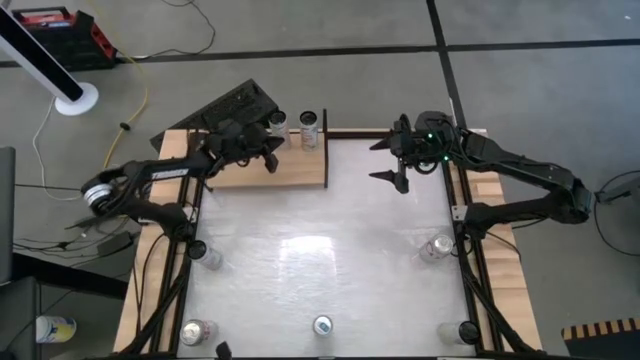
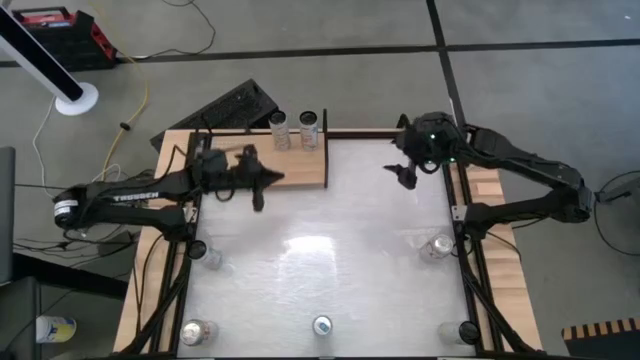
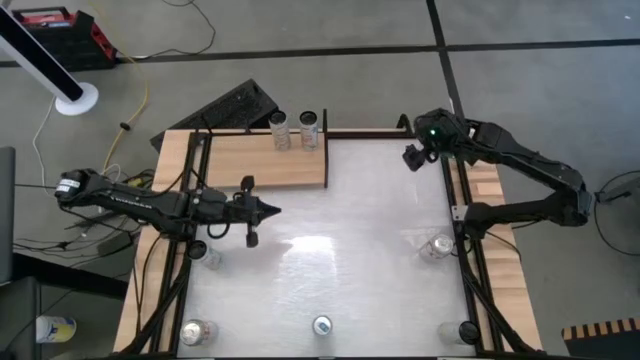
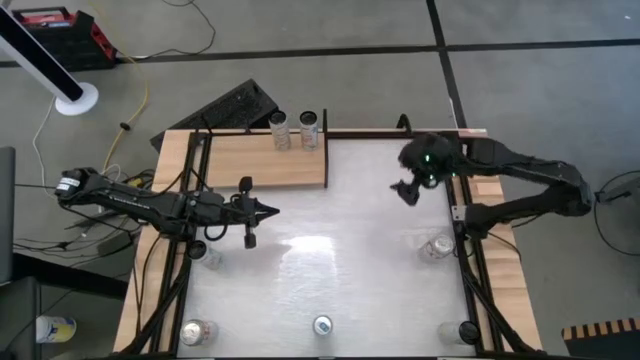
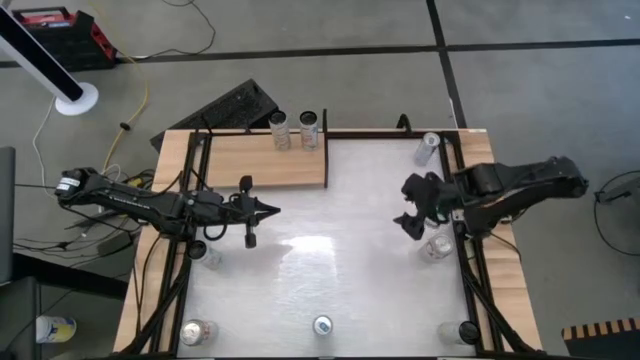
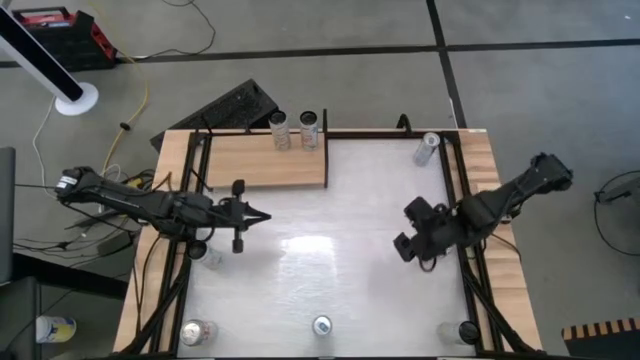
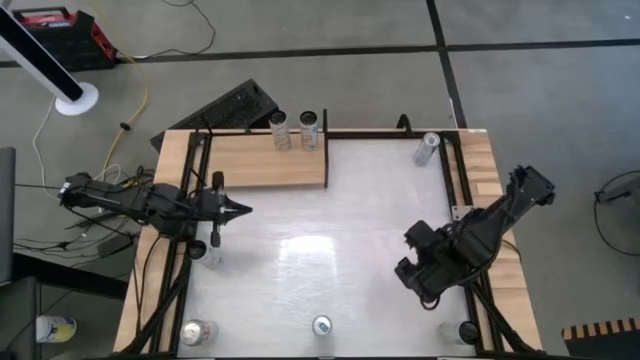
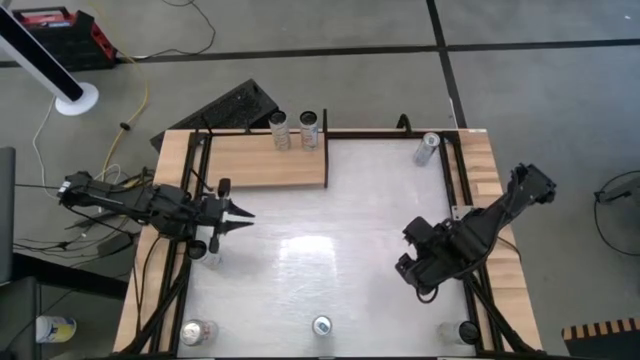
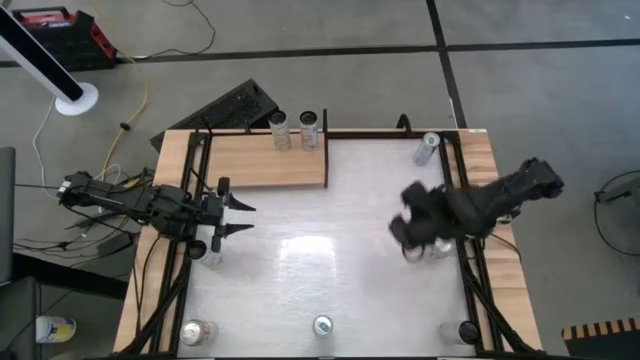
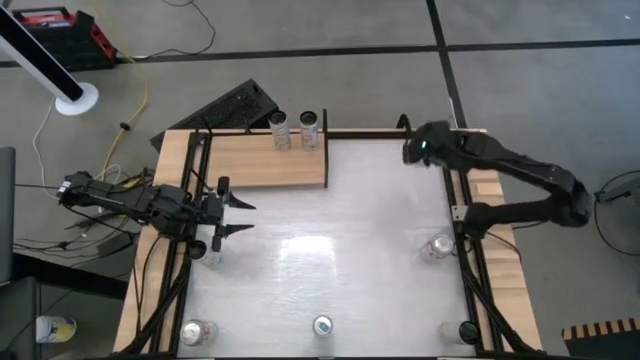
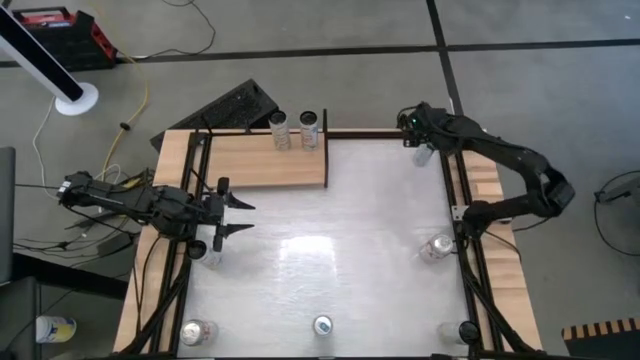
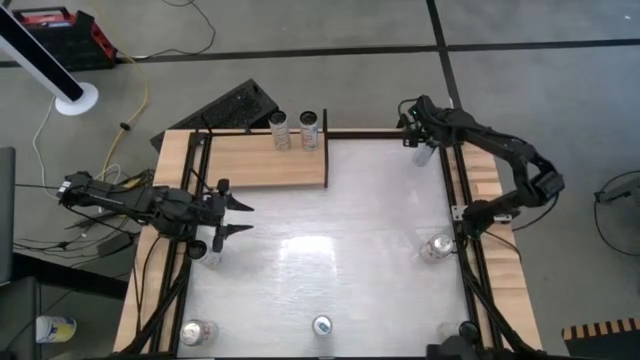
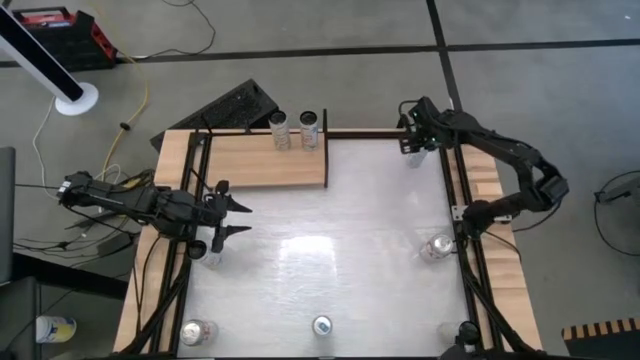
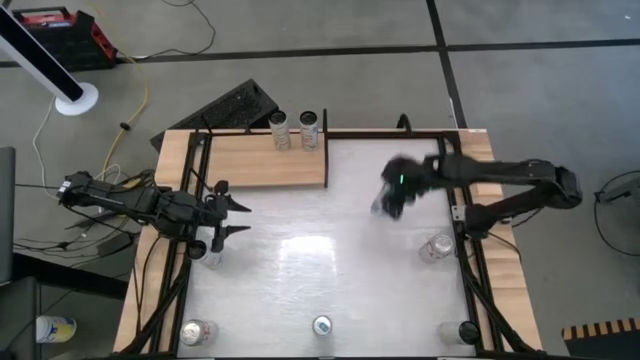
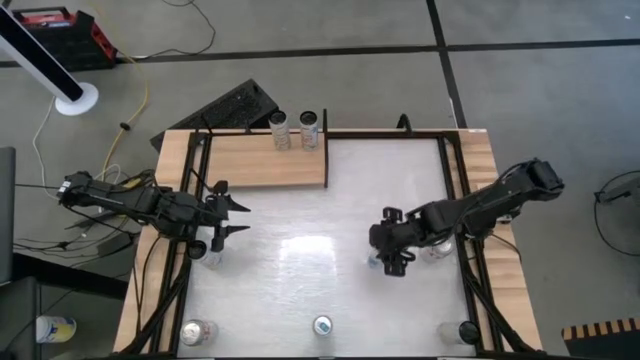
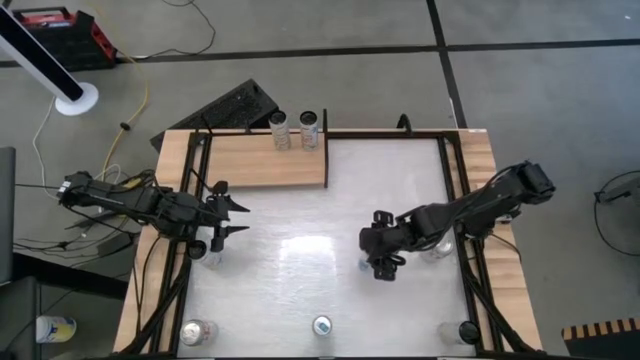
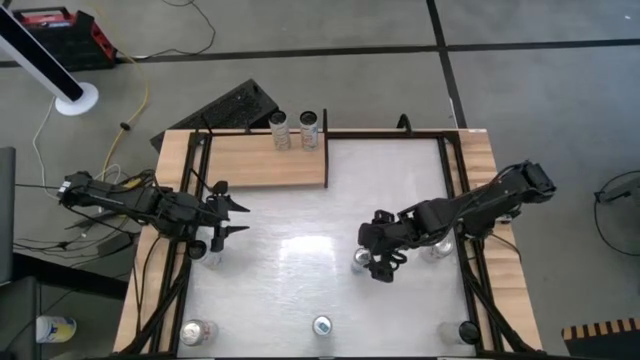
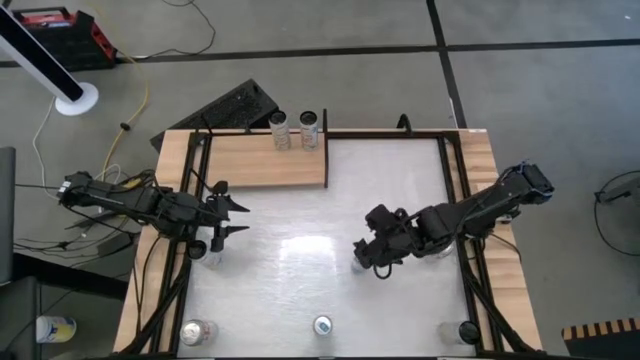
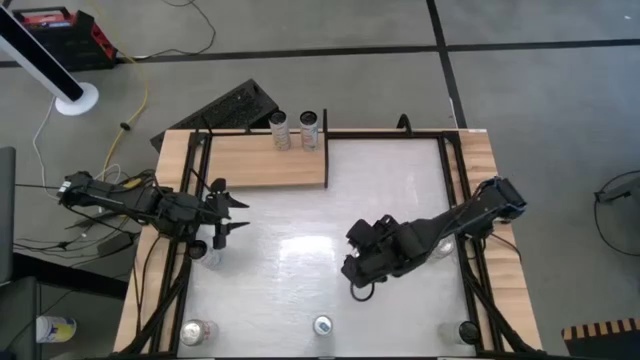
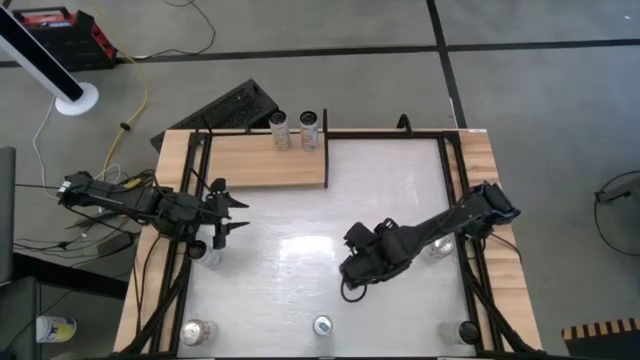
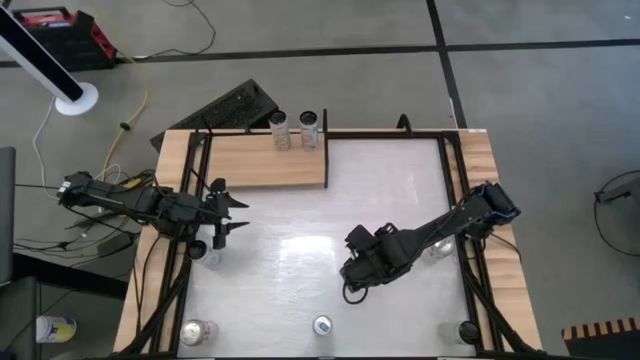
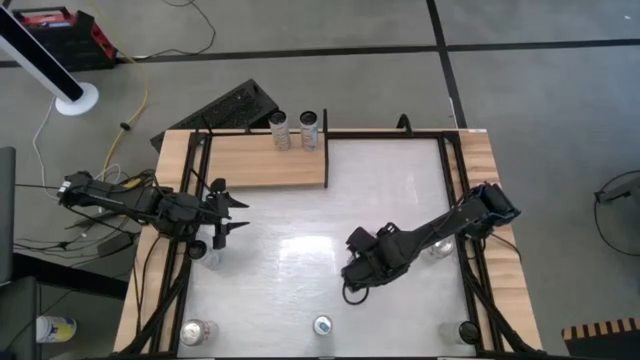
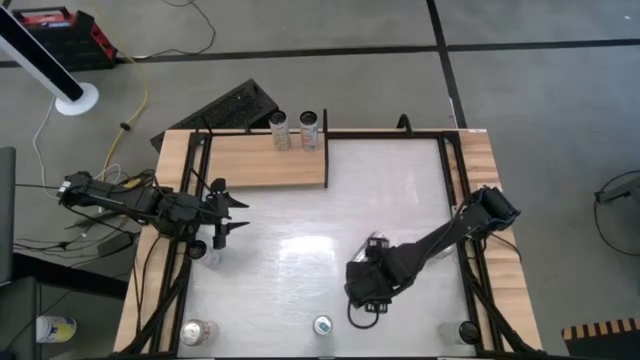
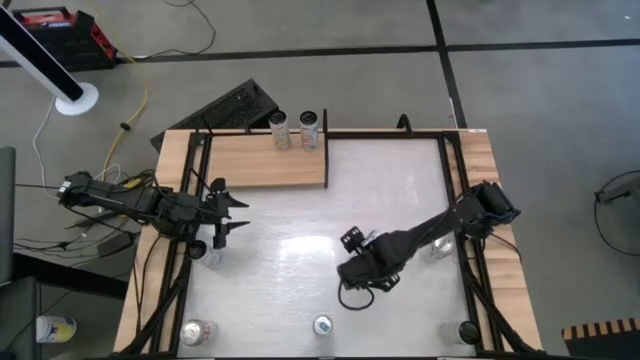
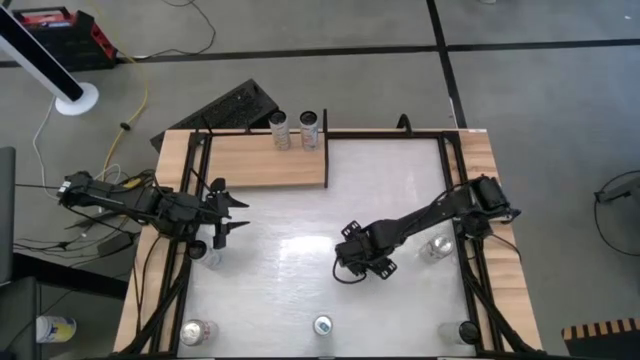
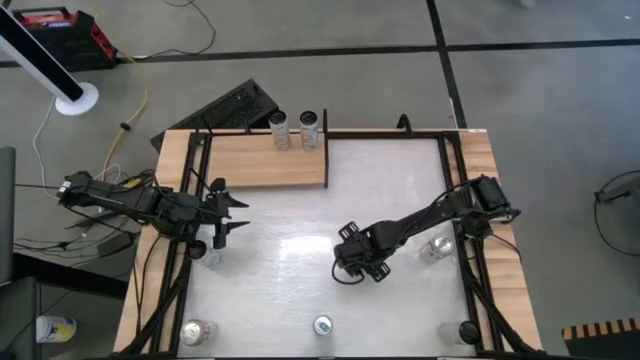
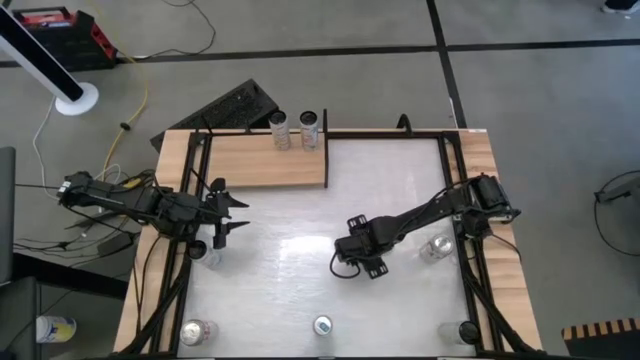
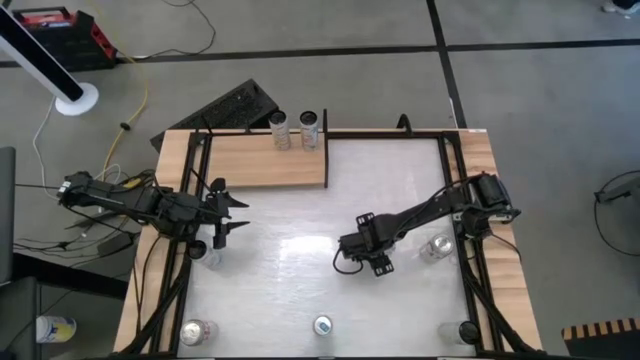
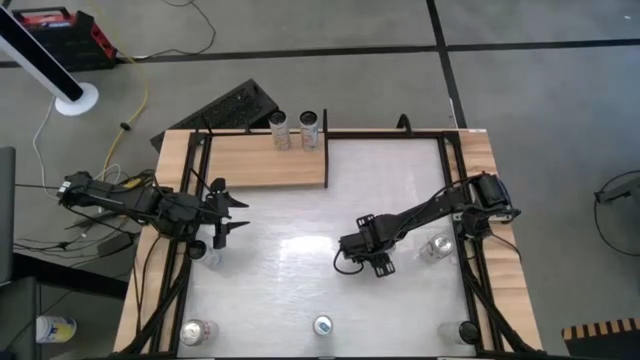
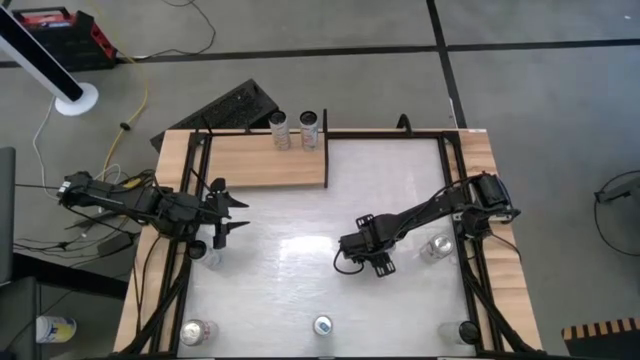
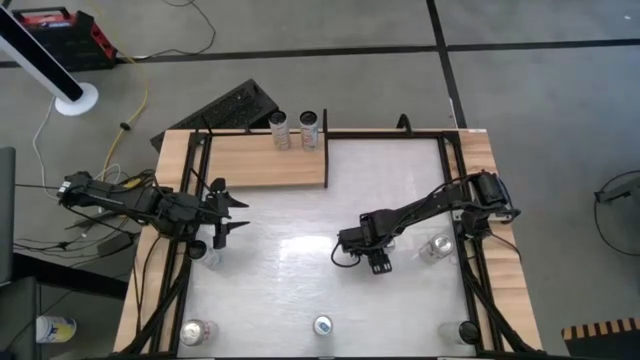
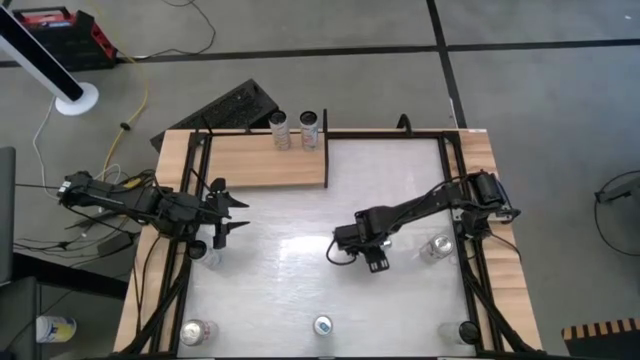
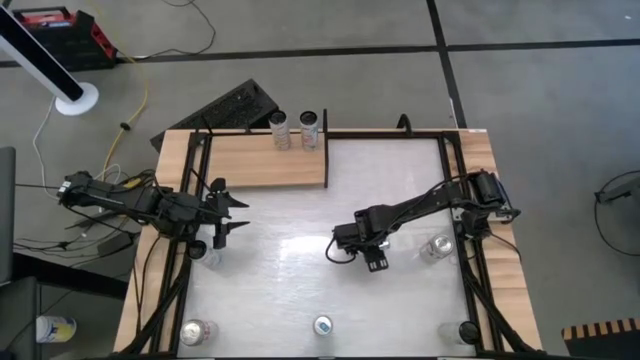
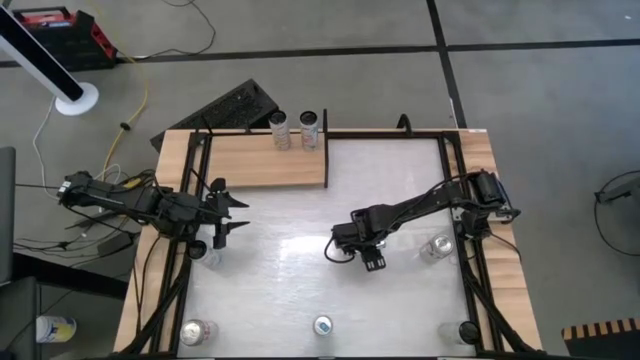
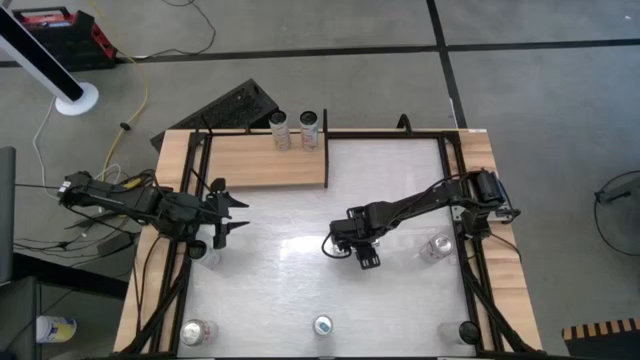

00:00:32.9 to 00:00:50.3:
Task: Place canned beverage on shelf
Put the top red bull soda can beside the tropical vibe soda can on the shelf

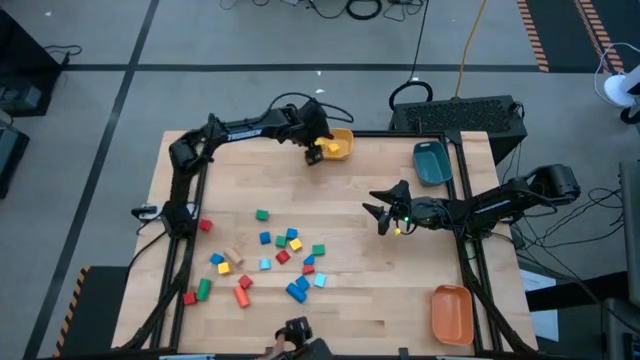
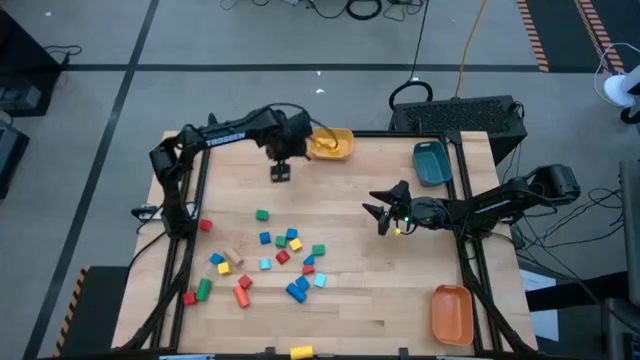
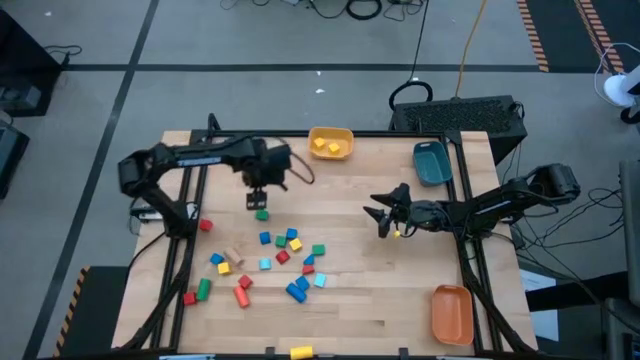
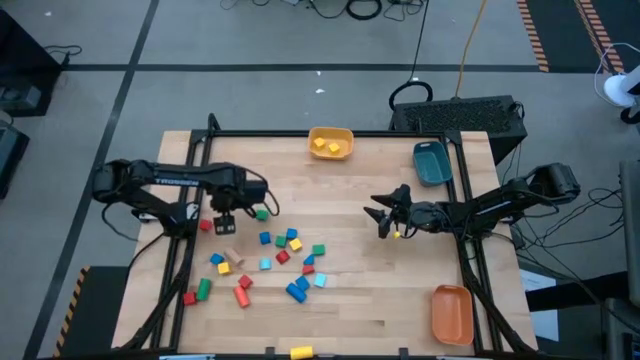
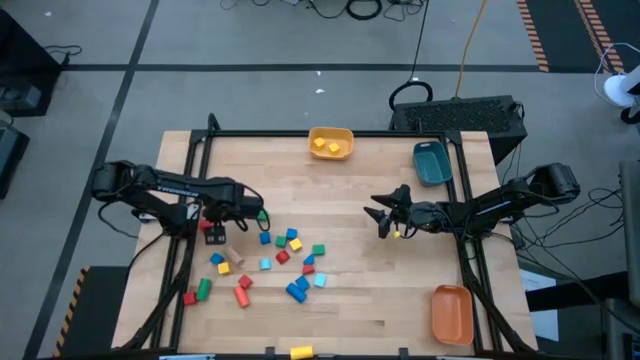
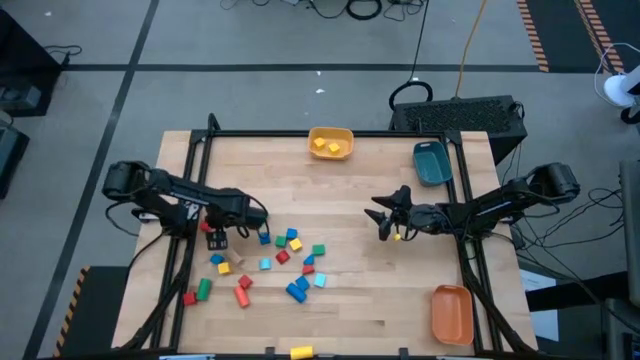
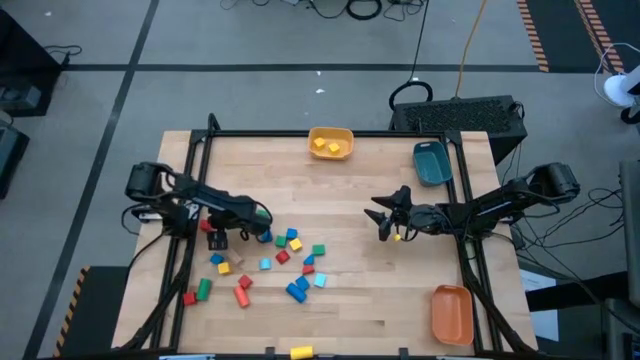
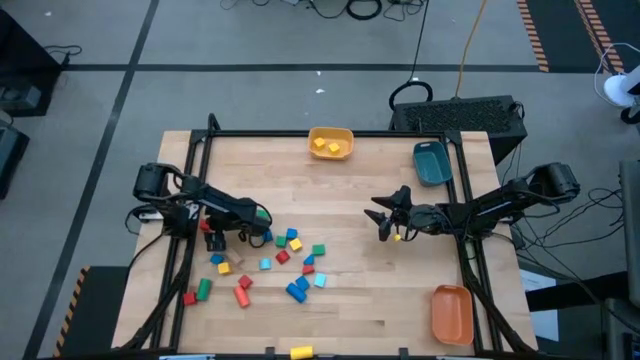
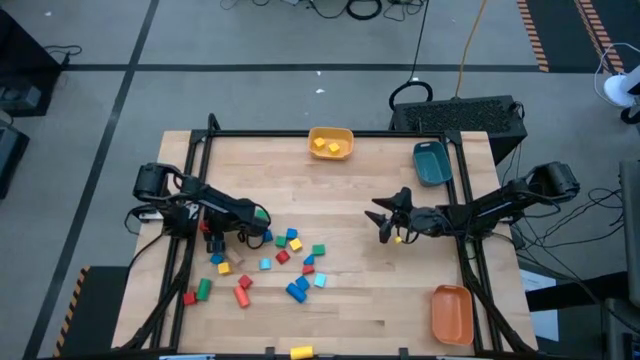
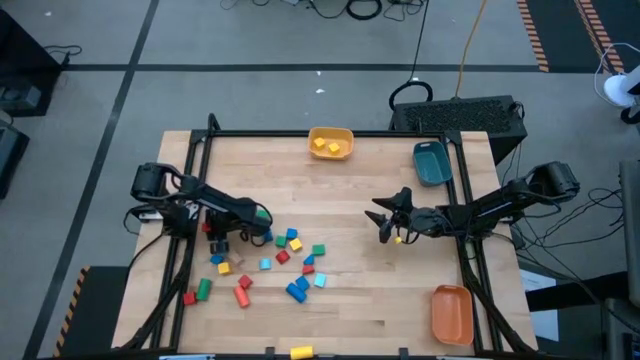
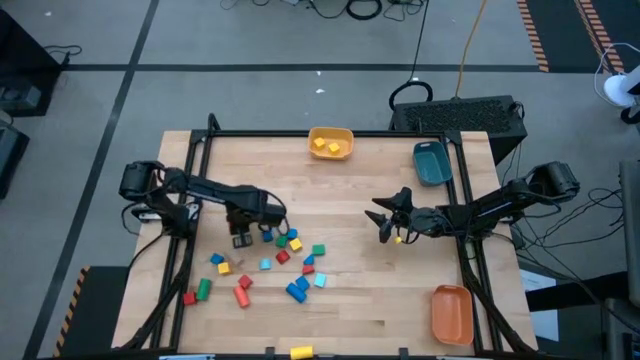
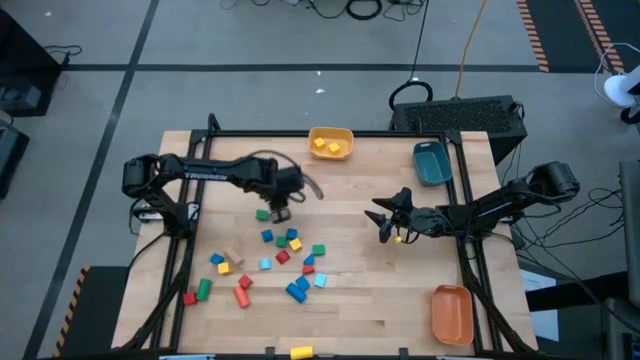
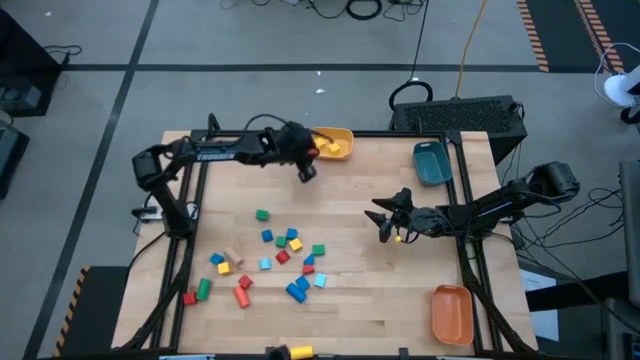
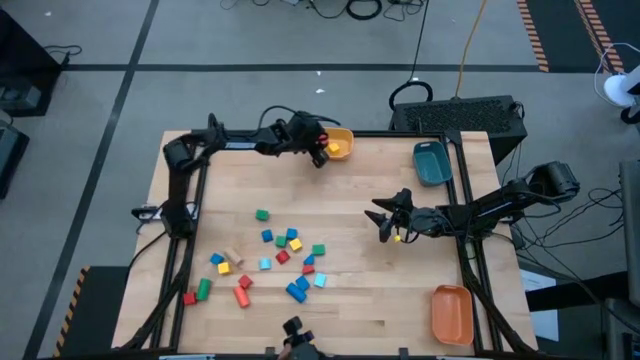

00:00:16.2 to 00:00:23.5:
Task: Sort blocks by size
Put the red square block into the yellow bin
